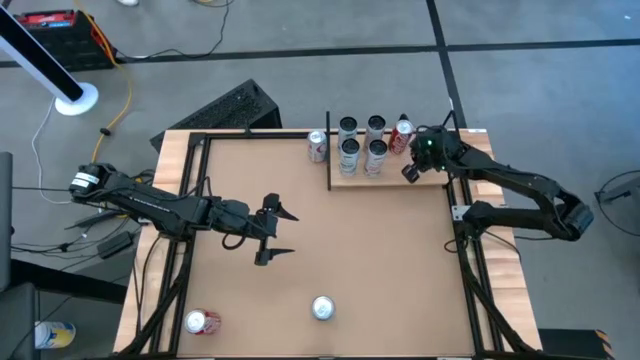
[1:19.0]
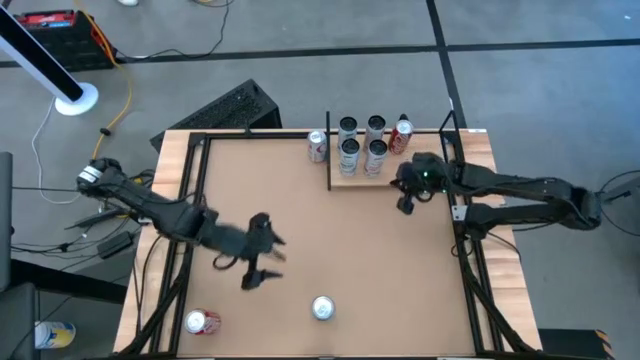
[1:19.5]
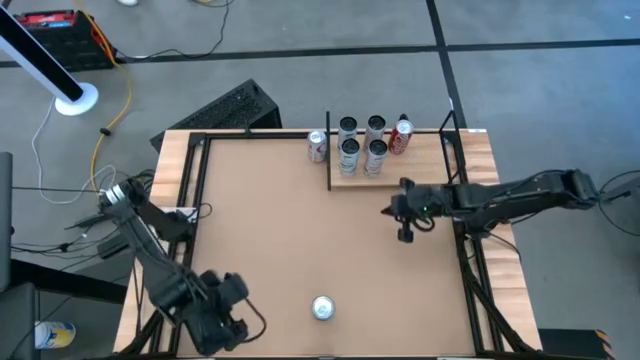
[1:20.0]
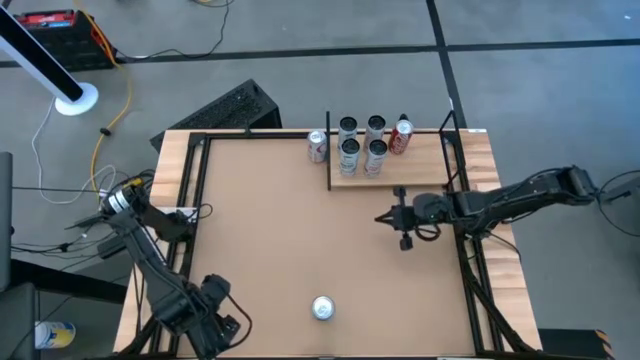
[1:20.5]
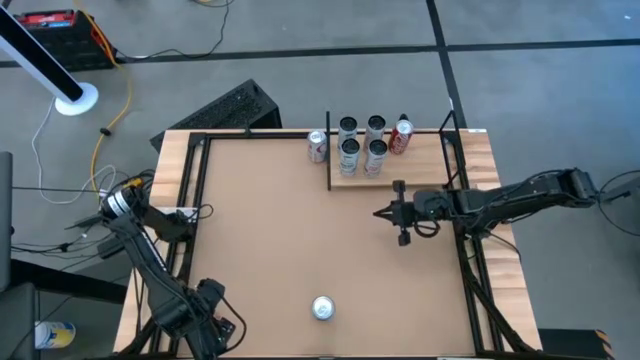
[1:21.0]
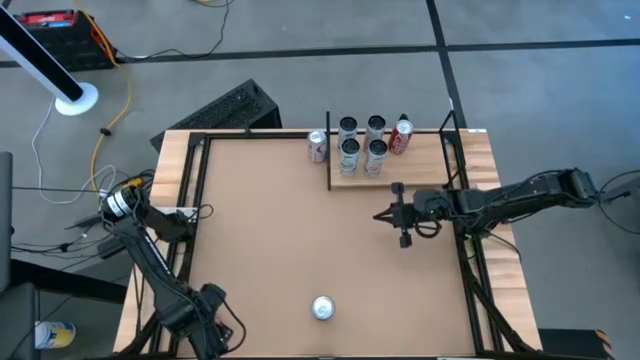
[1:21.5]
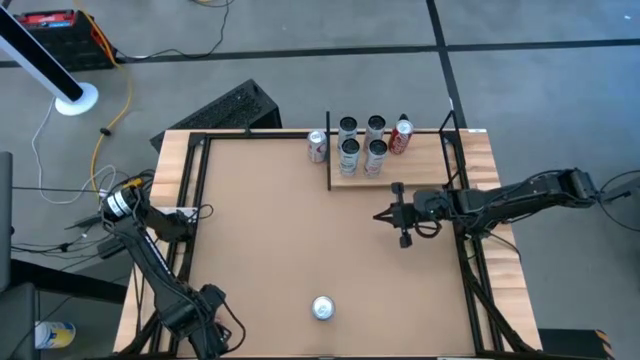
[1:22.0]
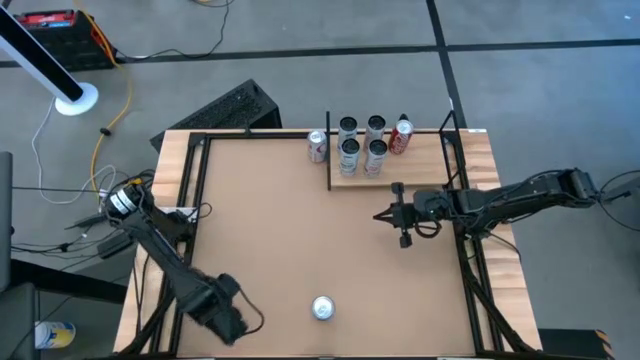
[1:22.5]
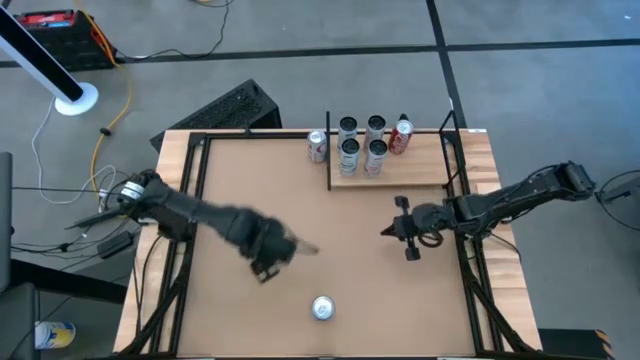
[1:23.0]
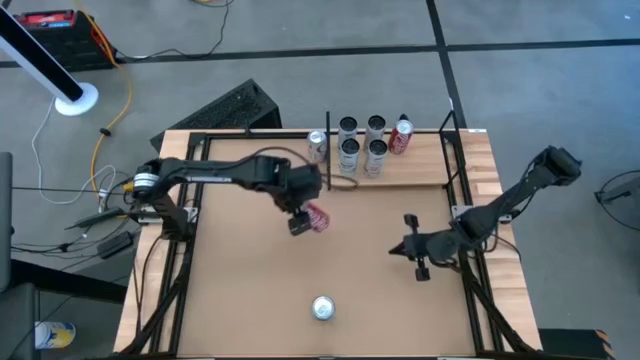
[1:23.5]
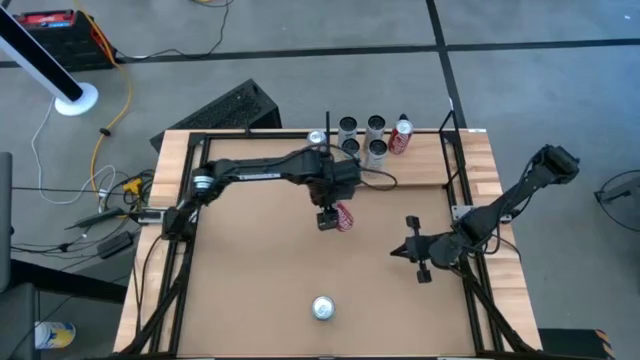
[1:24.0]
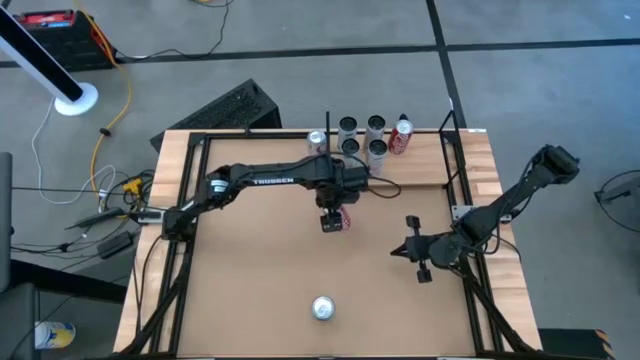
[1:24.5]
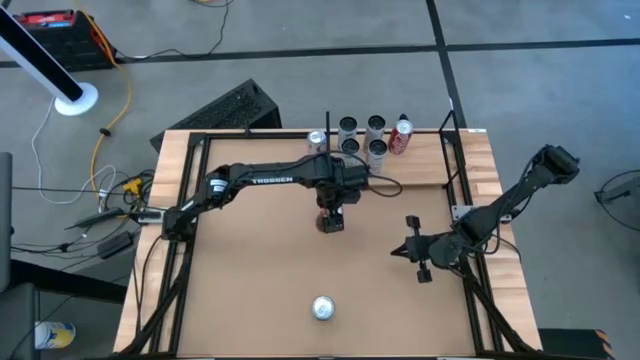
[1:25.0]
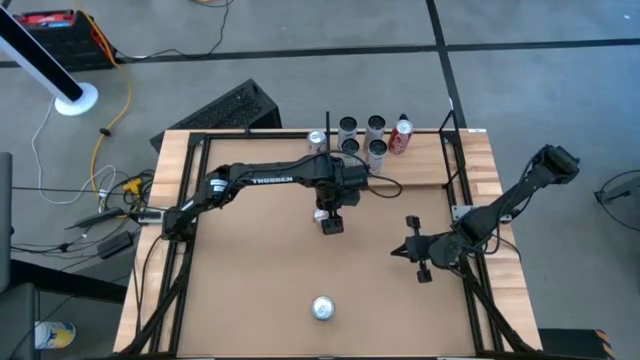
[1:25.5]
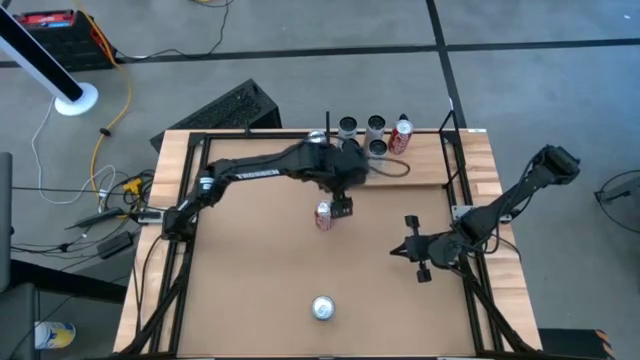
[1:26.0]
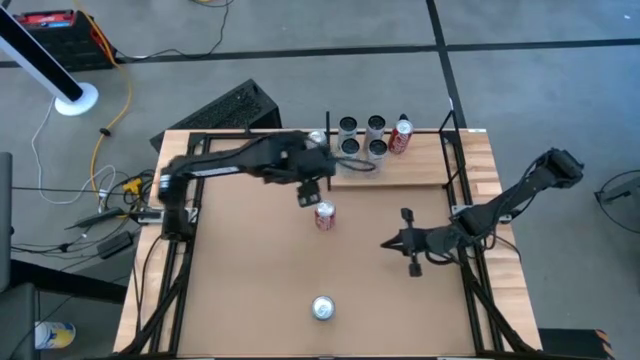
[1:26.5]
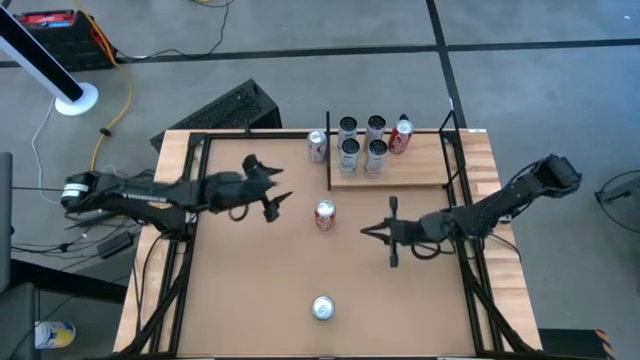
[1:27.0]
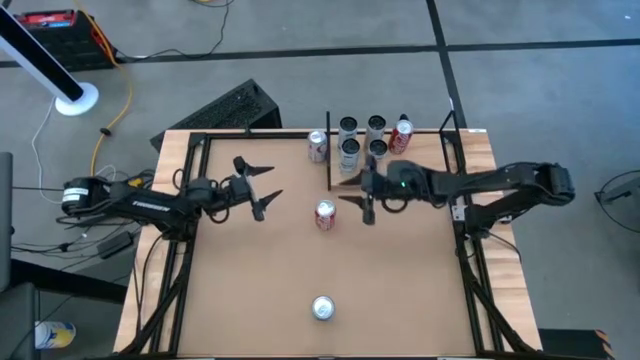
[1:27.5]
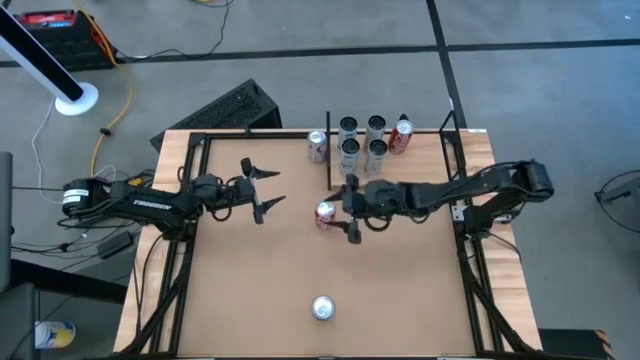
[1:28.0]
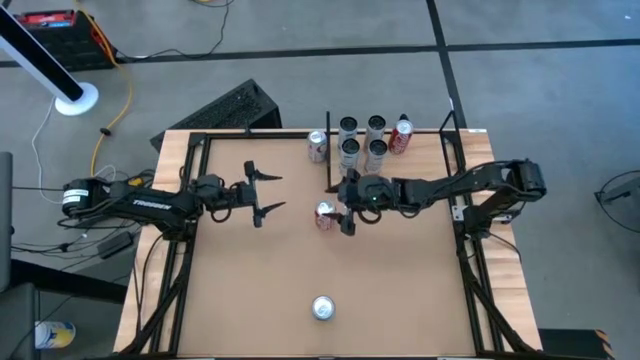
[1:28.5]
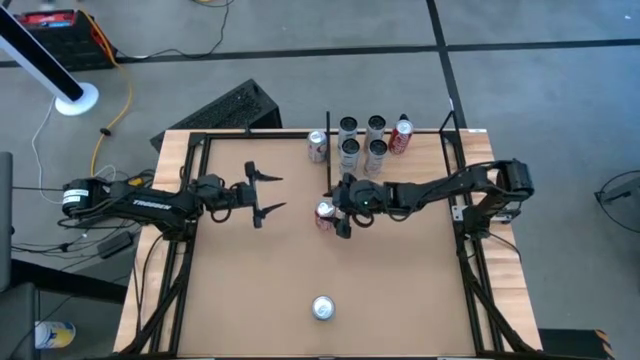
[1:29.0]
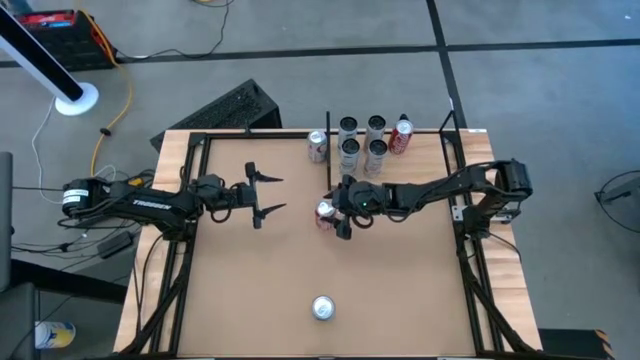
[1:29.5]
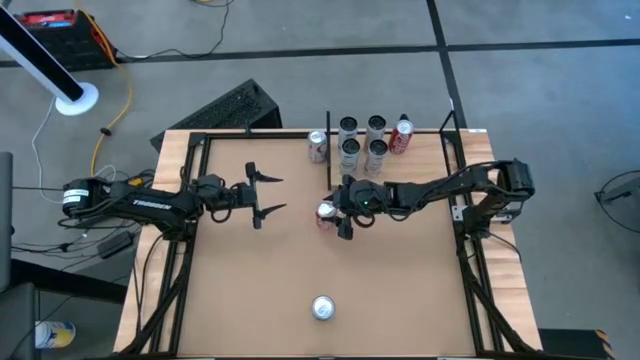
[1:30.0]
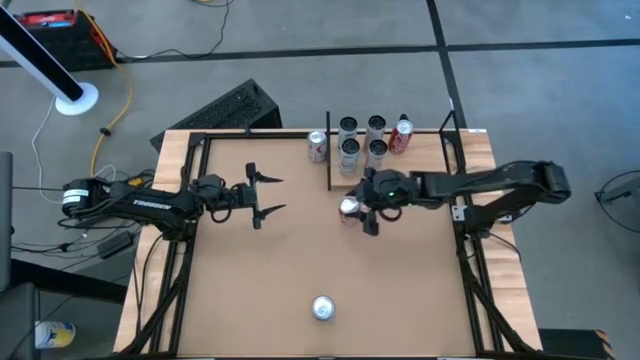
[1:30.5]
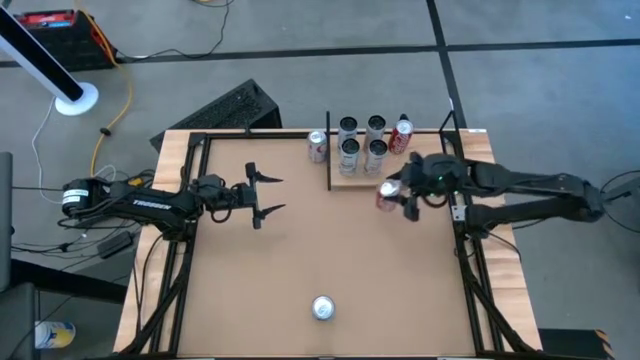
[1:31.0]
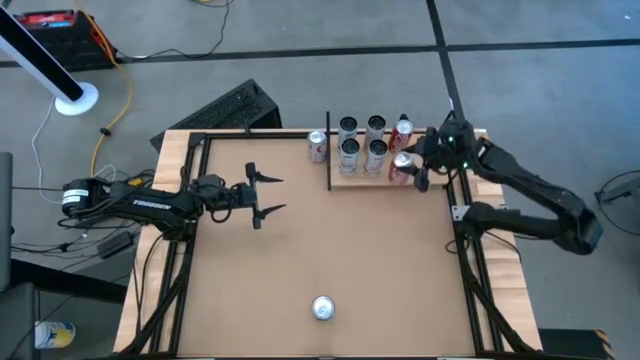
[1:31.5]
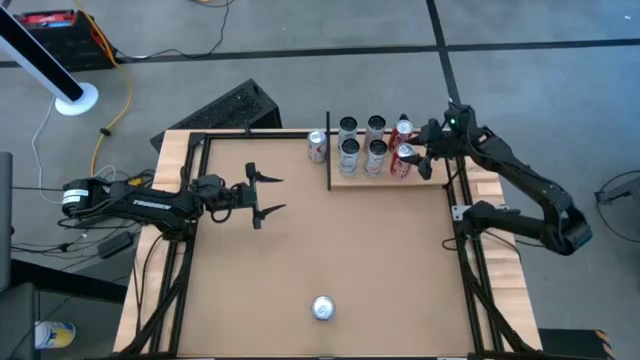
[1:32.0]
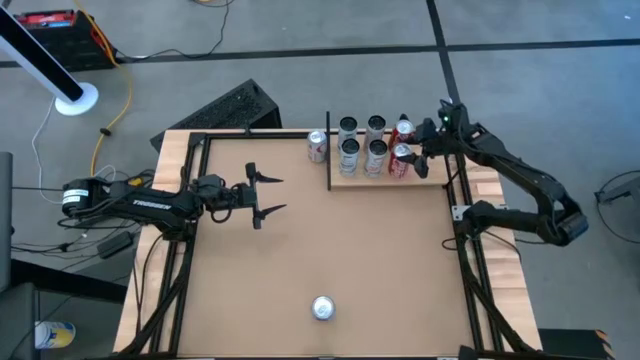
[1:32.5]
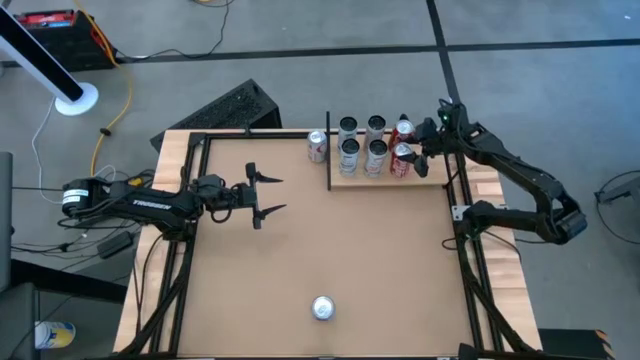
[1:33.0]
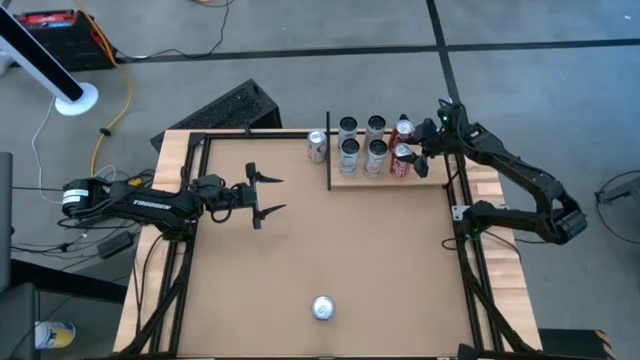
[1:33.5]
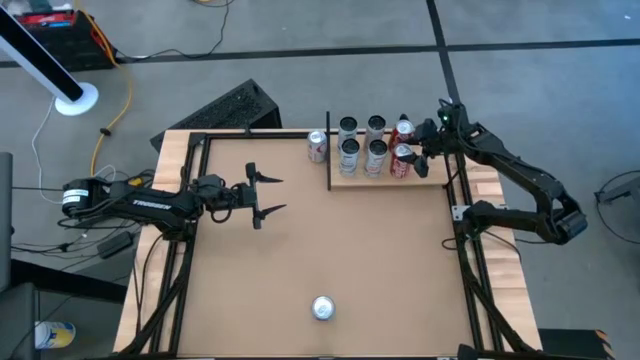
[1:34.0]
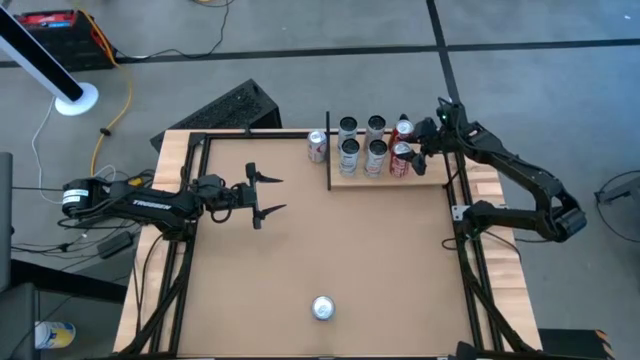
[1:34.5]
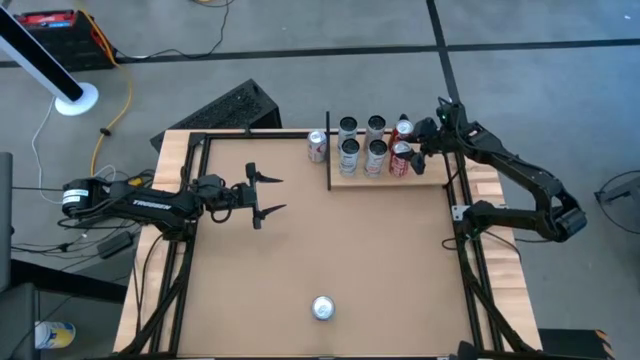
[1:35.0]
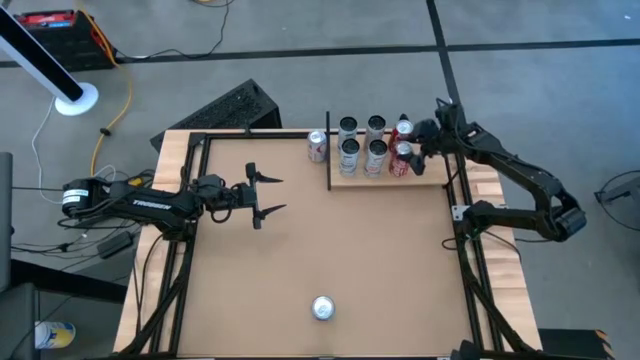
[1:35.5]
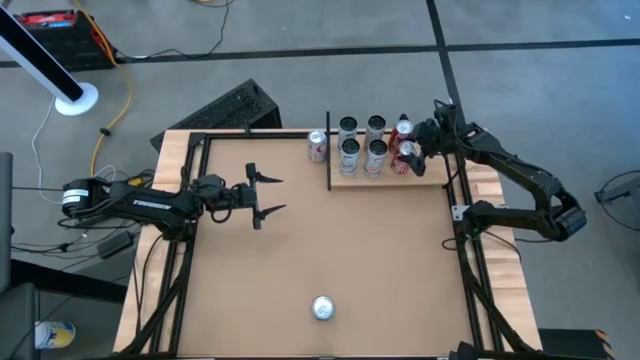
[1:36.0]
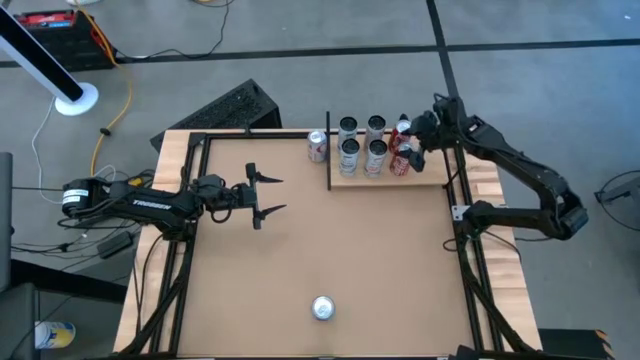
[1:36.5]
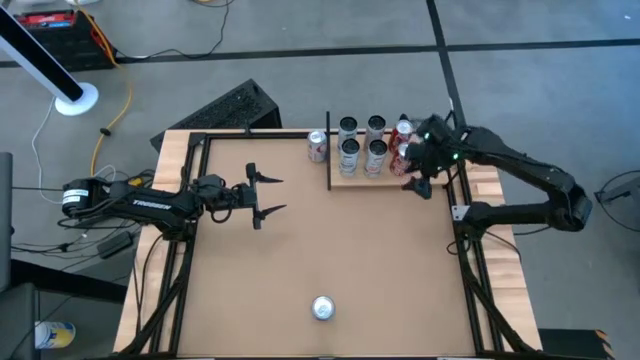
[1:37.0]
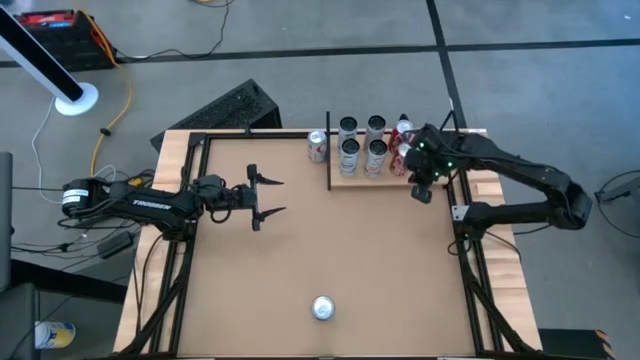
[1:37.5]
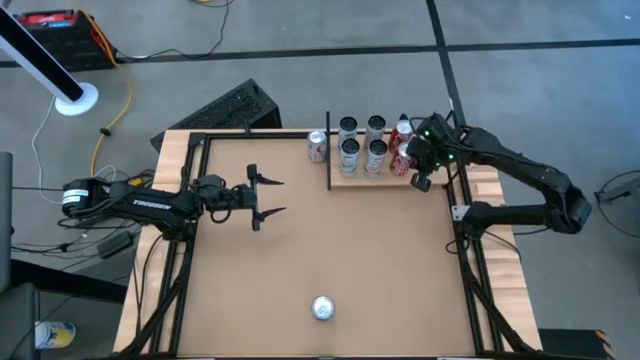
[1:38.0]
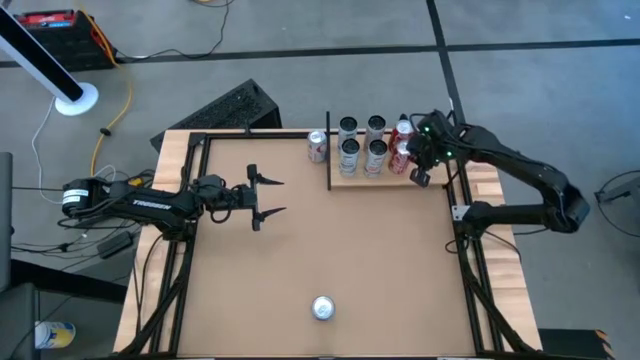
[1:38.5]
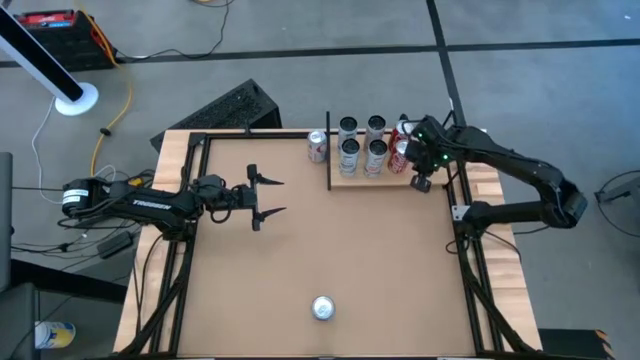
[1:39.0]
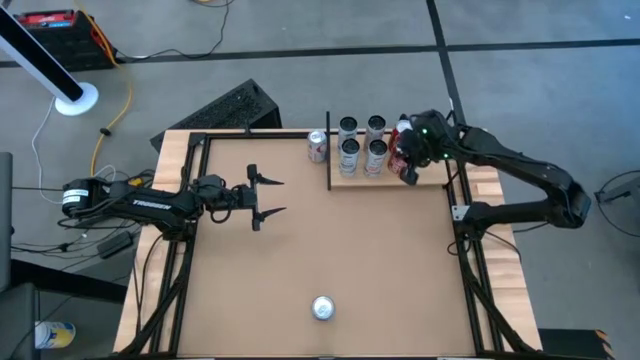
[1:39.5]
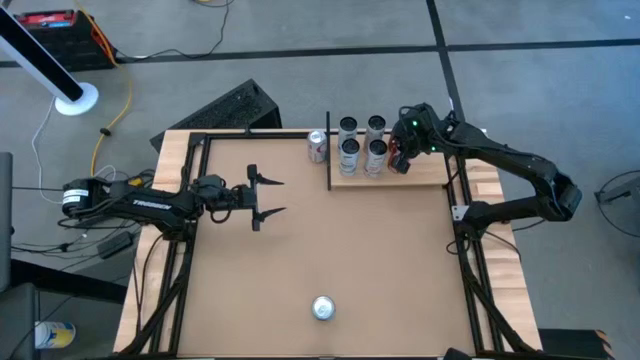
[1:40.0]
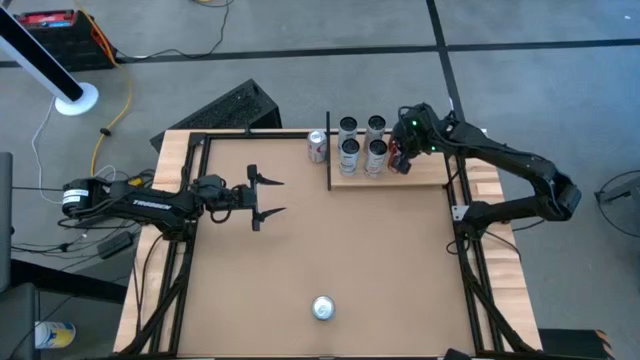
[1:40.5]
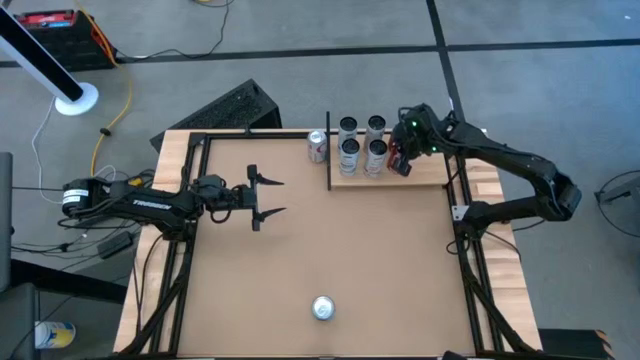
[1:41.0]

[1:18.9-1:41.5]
Task: Place canned beverage on shelf
Put the red soda can on the shelf
